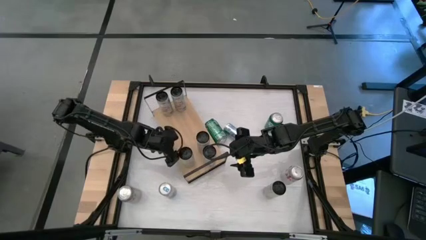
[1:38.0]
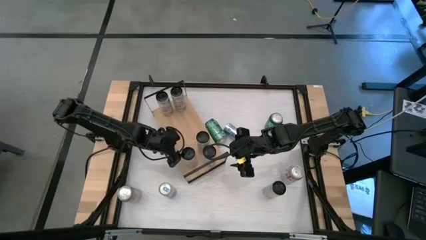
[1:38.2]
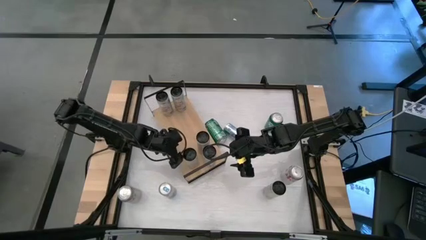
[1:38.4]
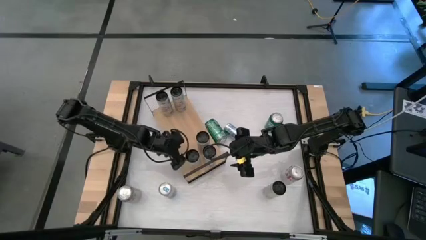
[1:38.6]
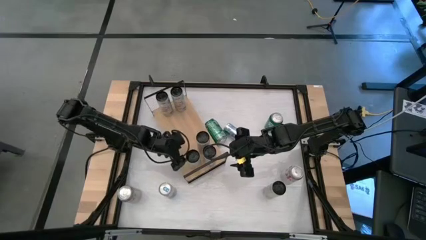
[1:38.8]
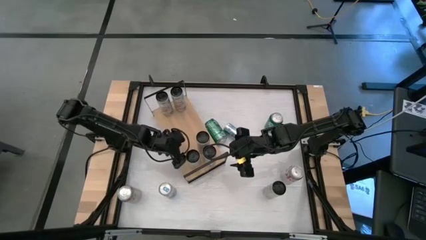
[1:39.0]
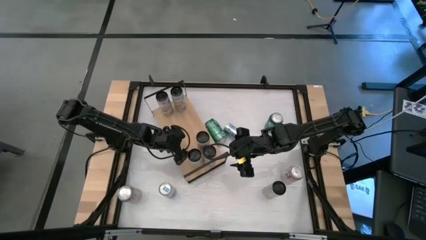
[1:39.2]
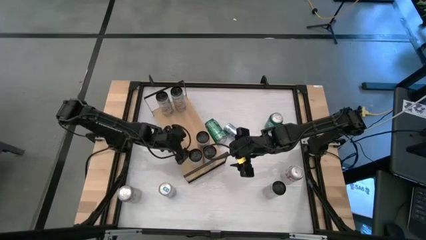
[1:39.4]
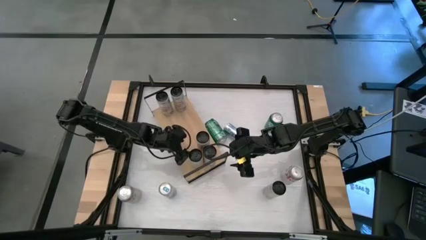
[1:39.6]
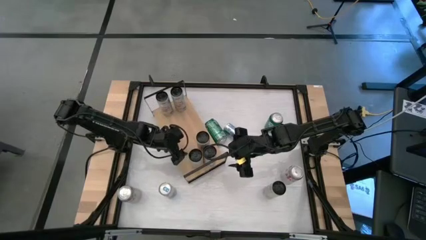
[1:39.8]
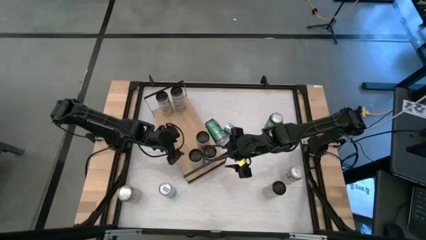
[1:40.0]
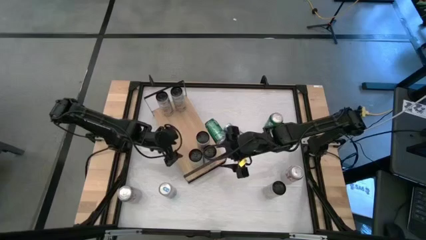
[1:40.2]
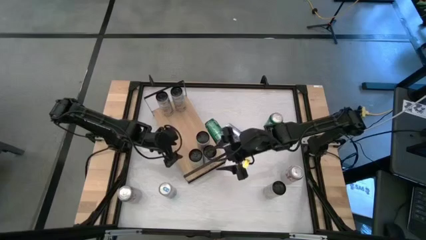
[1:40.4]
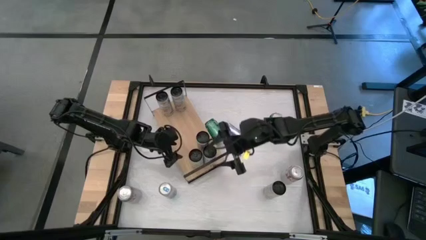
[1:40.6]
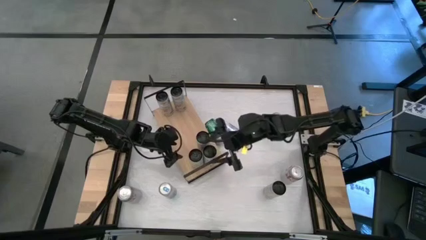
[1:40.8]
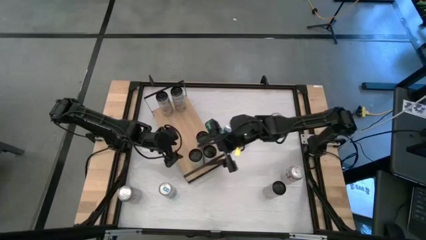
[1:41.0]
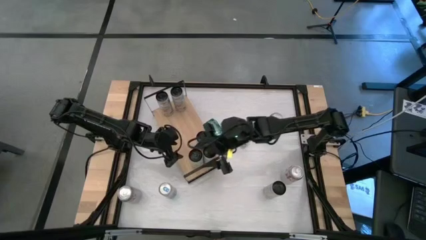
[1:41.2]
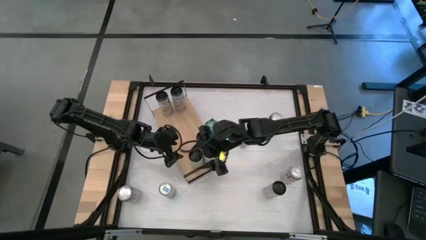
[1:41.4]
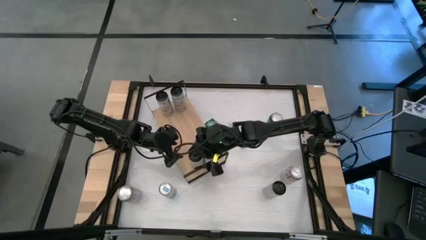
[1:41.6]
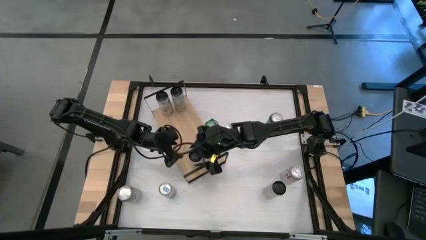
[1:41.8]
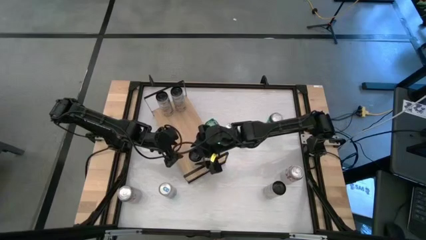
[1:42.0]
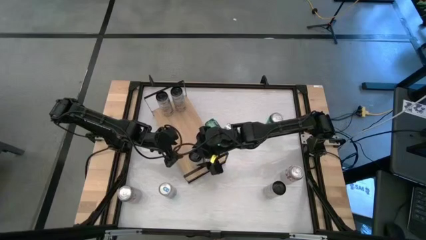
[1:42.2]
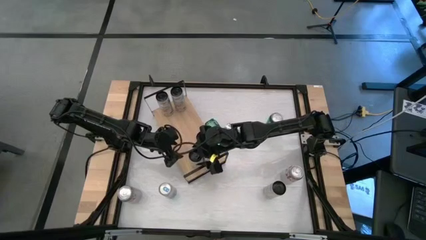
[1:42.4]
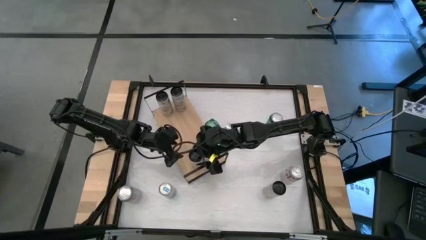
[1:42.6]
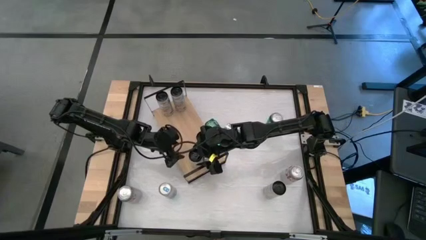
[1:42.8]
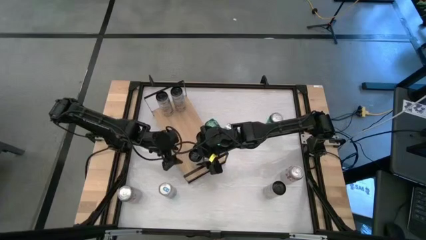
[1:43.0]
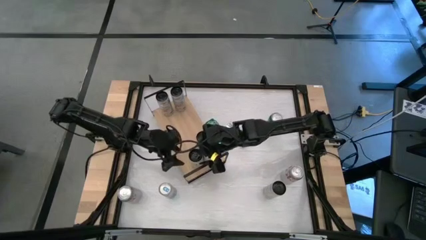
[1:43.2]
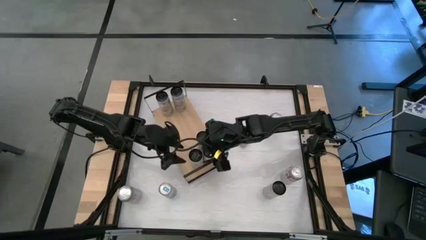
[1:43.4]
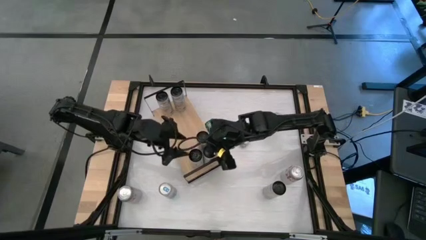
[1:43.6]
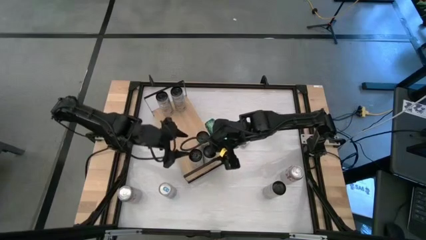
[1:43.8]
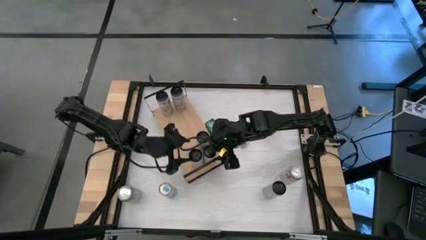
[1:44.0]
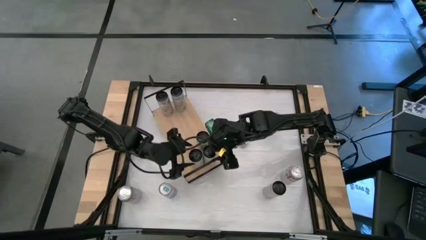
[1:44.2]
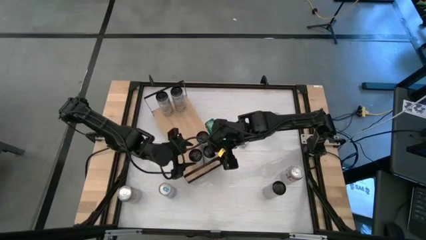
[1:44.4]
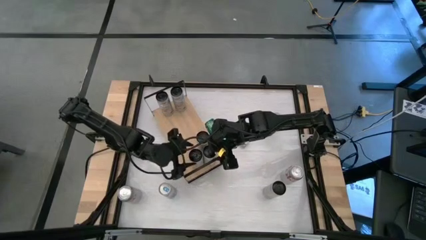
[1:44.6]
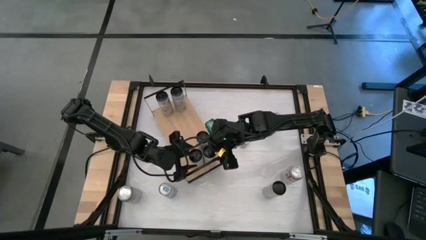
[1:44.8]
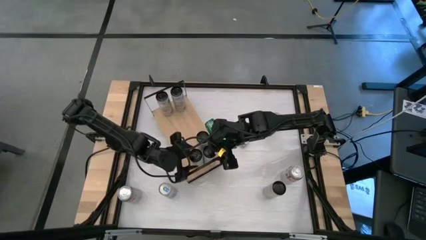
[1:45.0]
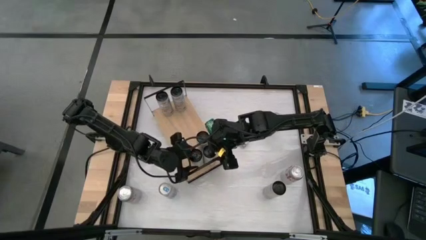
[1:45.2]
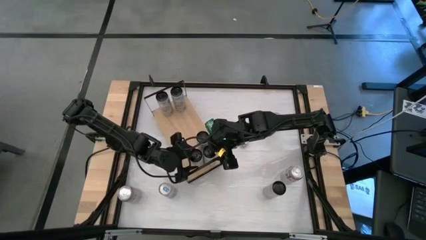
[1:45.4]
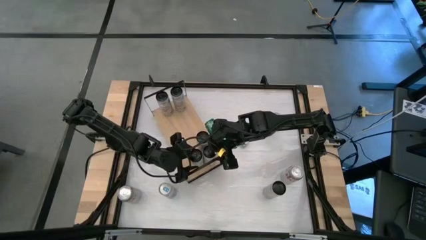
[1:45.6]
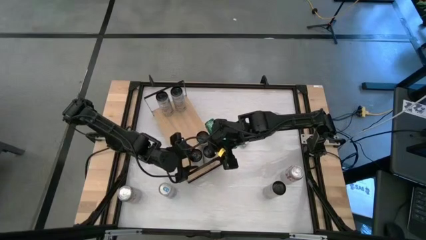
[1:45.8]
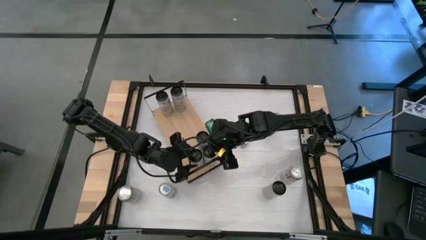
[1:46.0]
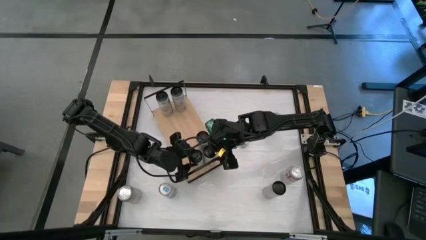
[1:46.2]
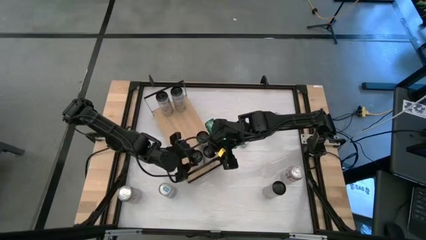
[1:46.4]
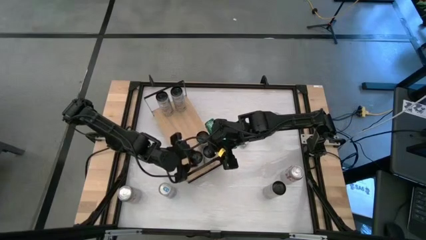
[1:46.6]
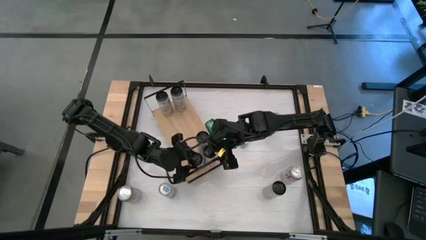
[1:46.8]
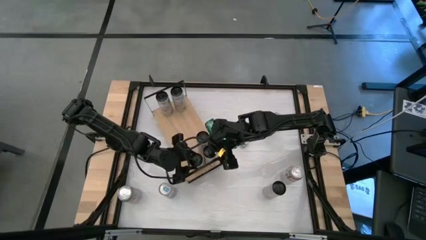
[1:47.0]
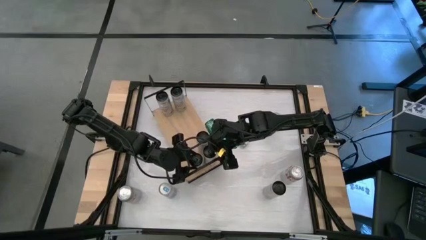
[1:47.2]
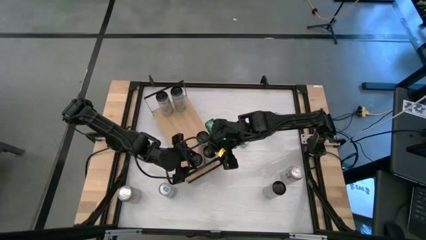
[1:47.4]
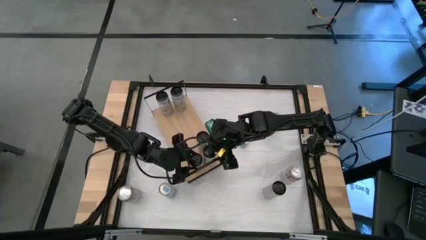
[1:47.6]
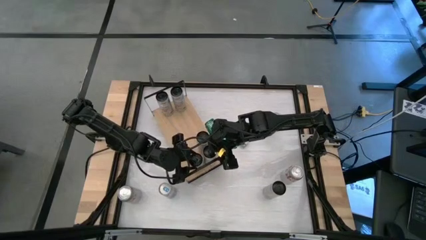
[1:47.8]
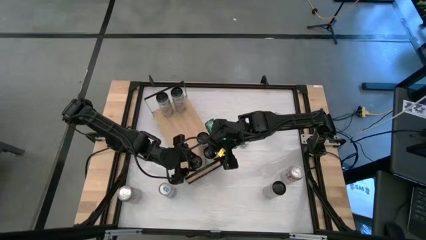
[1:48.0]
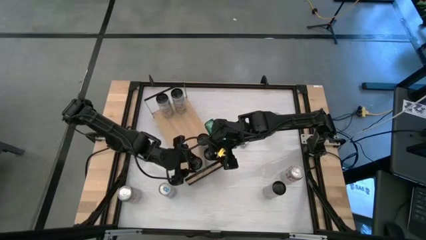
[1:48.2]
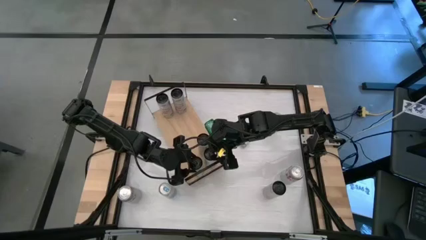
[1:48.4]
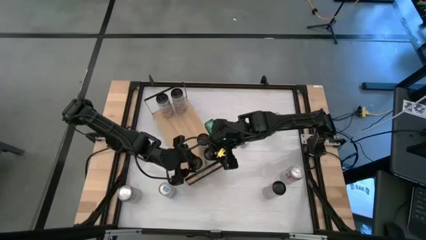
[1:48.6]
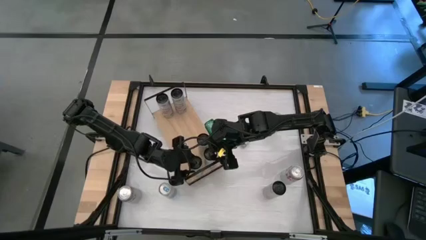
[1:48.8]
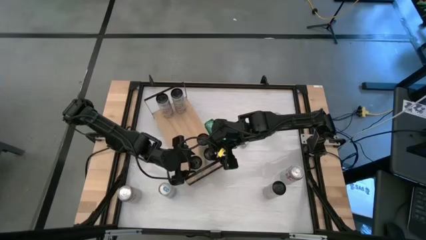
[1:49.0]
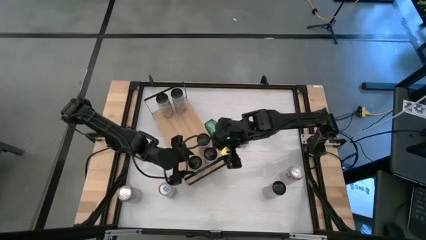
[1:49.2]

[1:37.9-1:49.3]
Task: Place canned beverage on shelf
Put the white yellow soda on the shelf aligned with the other white yellow soda cans
